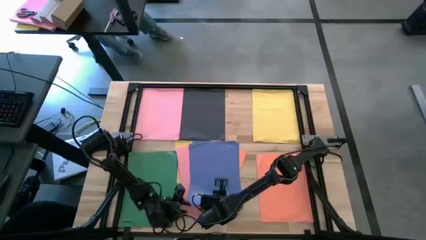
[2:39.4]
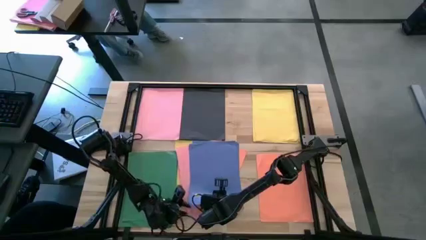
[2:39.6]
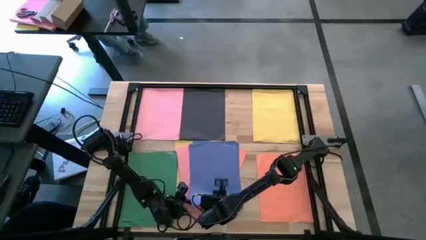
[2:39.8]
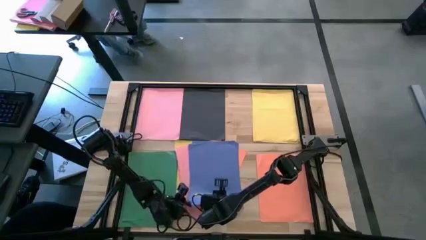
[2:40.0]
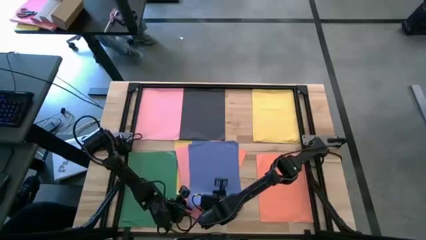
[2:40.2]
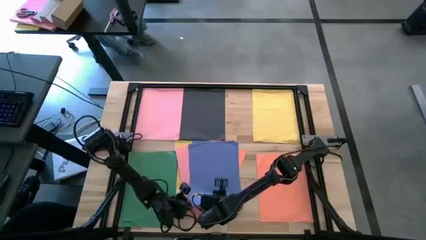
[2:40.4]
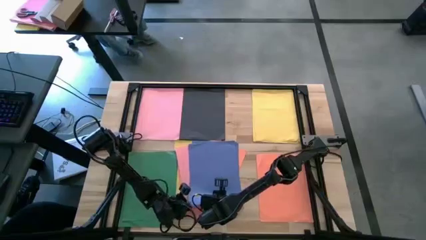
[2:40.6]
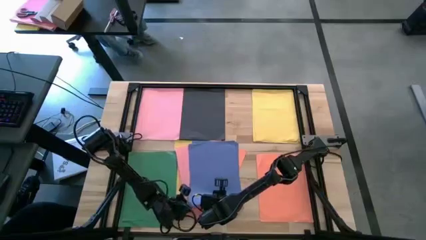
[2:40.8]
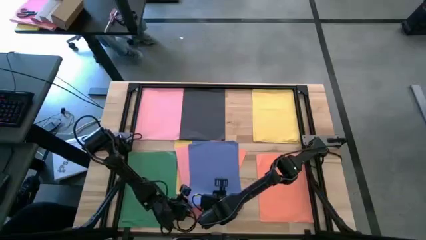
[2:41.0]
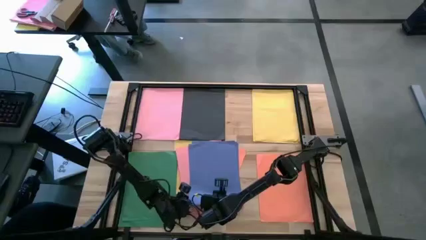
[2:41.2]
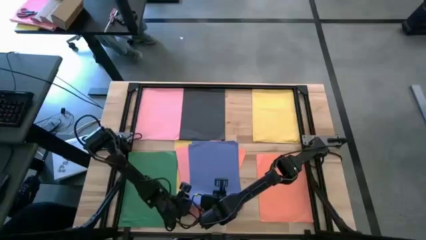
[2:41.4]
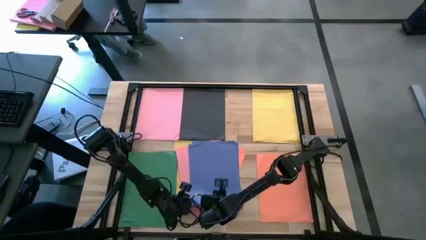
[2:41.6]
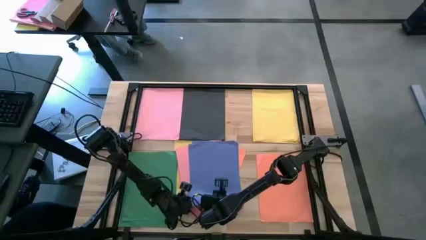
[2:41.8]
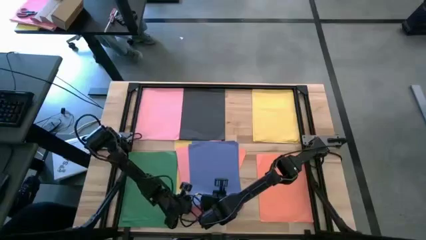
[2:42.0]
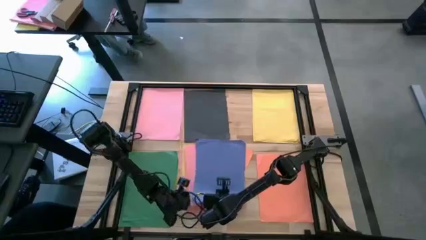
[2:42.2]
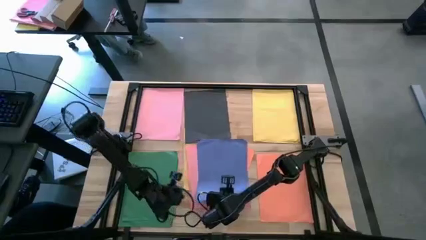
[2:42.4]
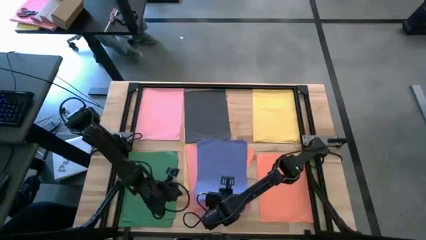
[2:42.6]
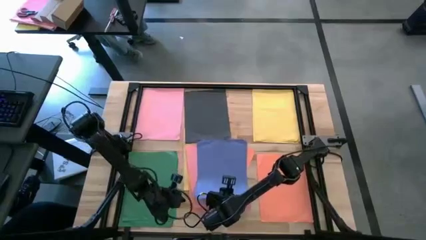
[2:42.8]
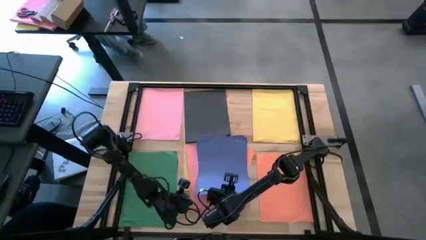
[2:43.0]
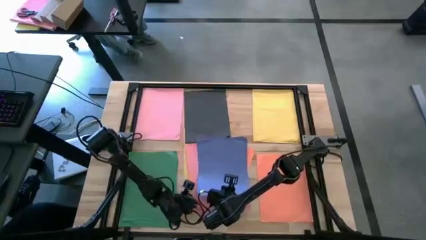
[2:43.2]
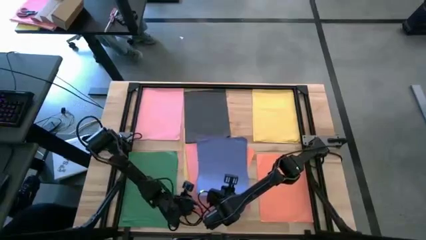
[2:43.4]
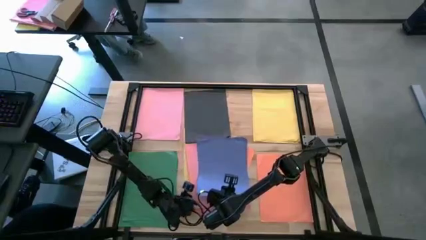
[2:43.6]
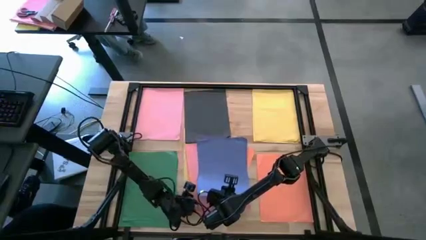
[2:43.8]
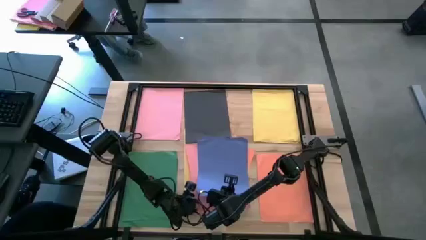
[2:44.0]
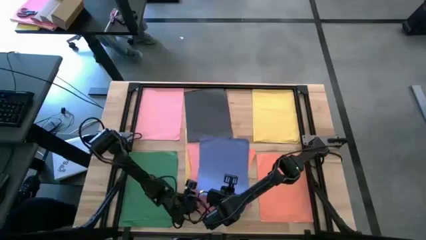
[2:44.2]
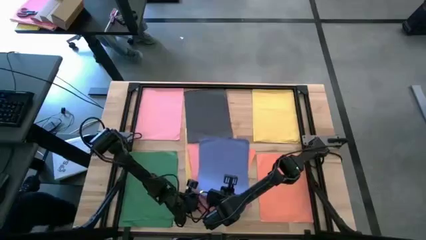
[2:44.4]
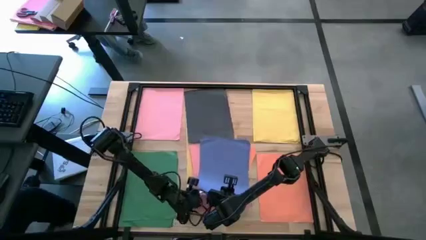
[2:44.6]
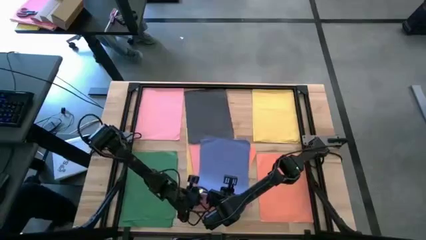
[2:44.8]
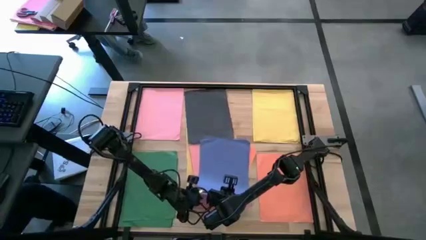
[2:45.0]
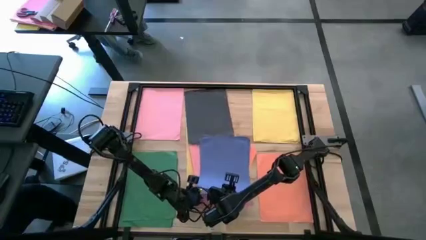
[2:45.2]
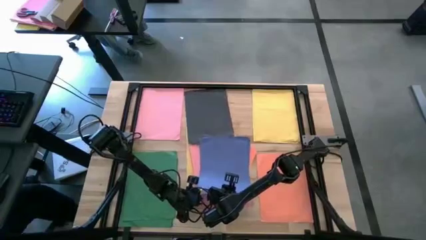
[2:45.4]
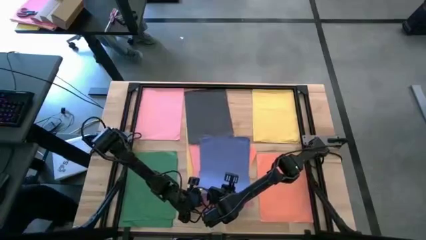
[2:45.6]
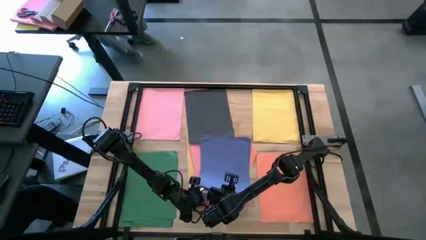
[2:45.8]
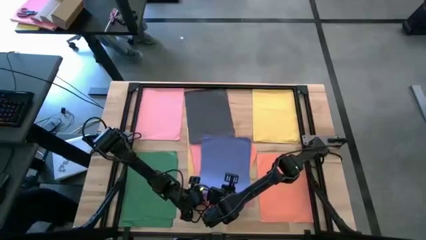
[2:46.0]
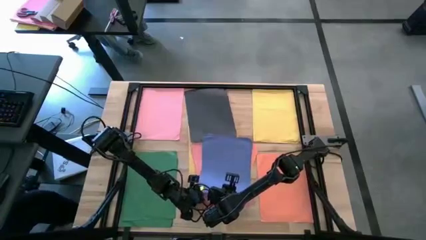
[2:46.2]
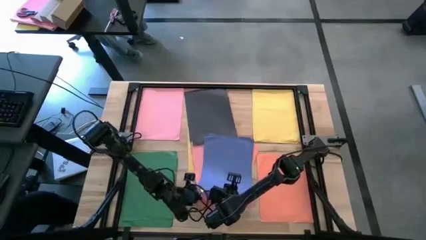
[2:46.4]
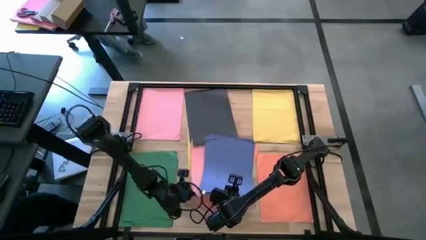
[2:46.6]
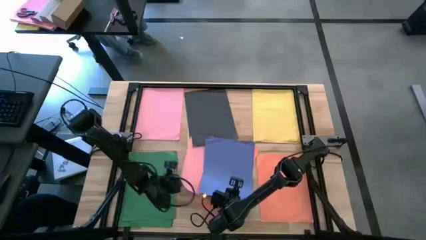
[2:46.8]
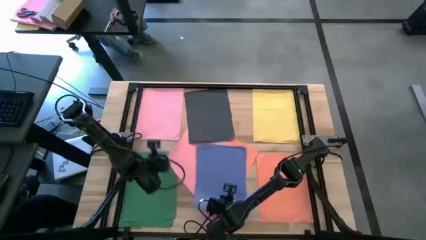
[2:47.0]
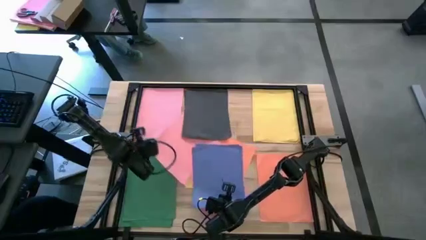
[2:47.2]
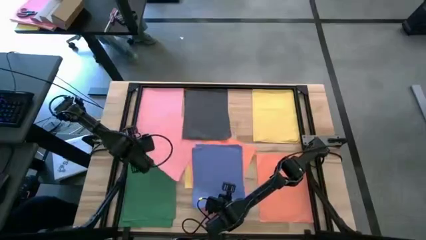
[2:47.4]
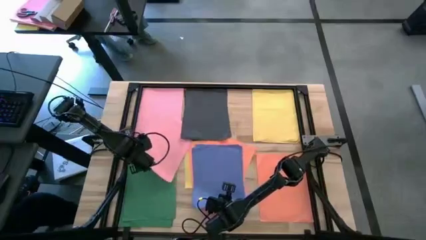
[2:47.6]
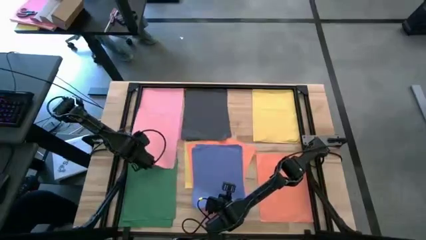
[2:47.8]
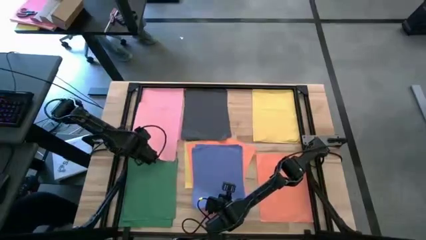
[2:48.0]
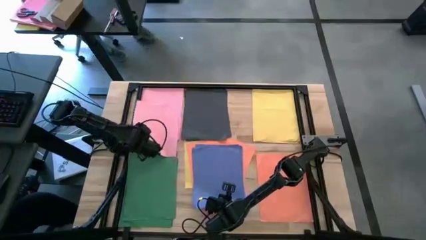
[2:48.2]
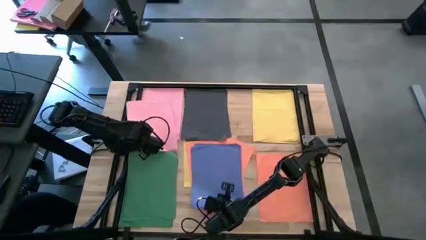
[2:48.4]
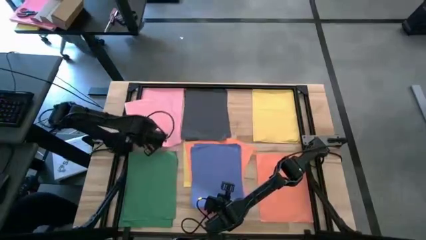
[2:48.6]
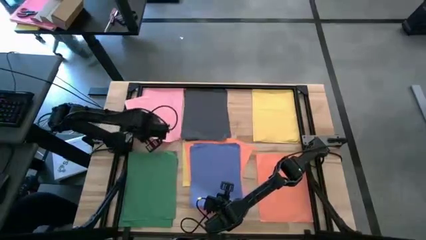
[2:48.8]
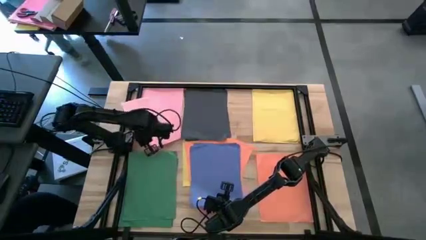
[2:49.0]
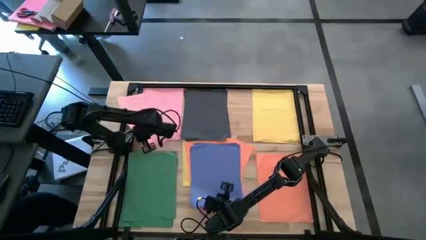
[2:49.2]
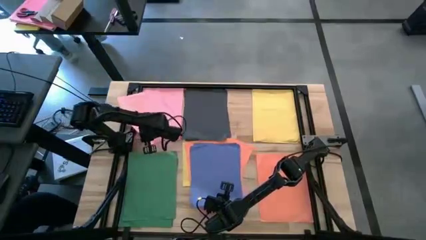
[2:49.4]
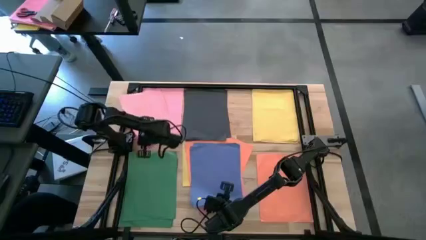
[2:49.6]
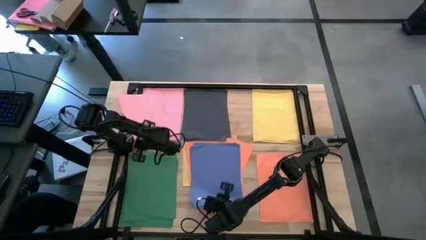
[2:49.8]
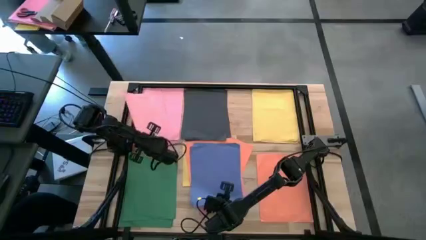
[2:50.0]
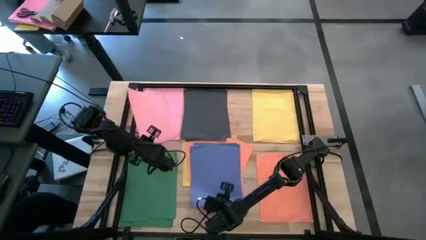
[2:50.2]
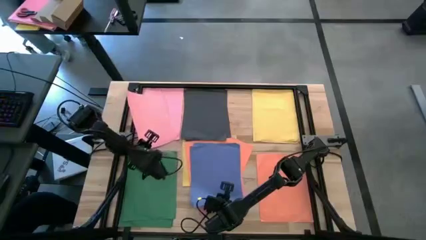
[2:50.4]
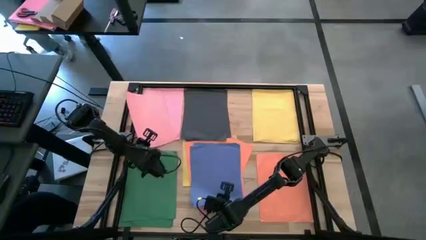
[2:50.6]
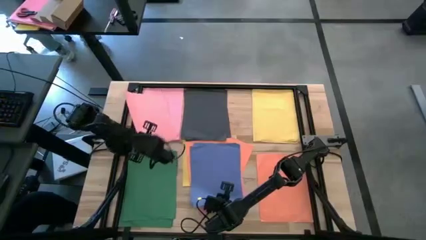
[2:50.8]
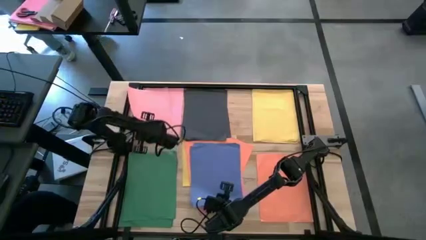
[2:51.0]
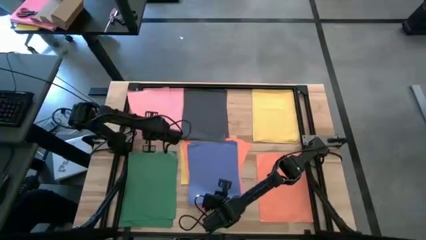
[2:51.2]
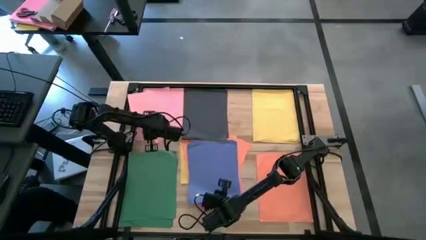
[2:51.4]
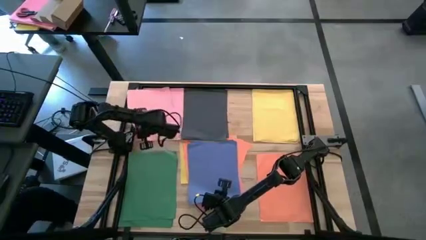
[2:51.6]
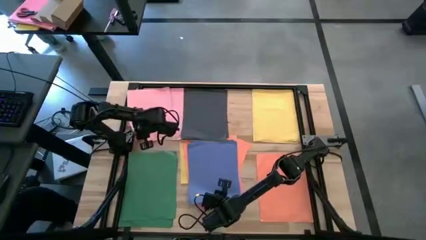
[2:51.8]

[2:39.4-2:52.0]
Task: Organize paper
Stack the pink color paper on top of the other pink color paper

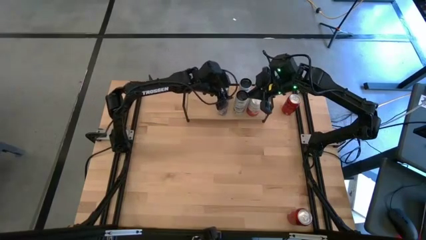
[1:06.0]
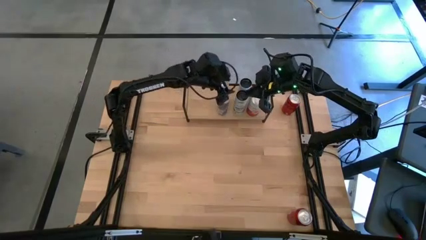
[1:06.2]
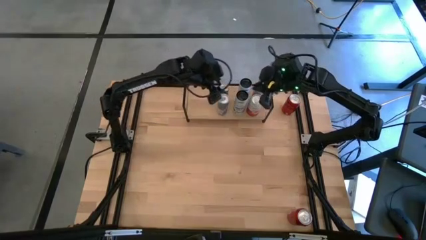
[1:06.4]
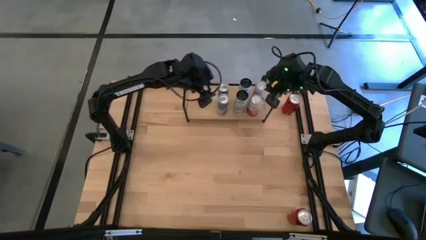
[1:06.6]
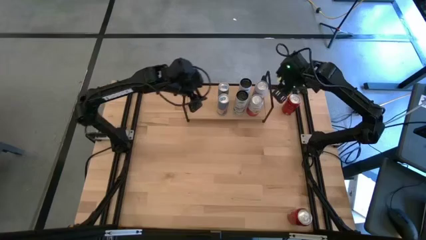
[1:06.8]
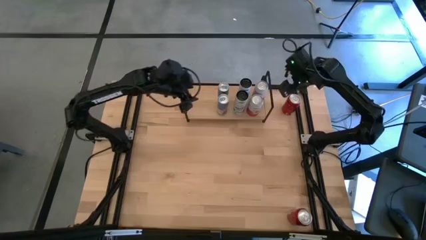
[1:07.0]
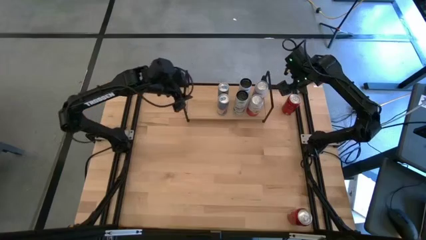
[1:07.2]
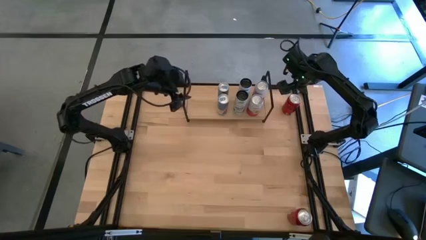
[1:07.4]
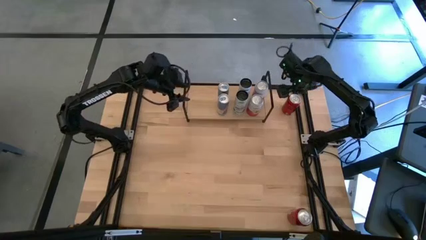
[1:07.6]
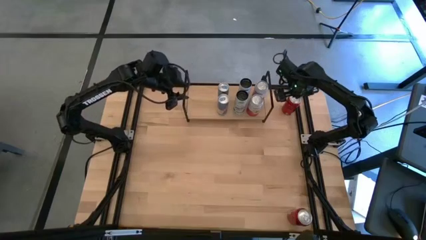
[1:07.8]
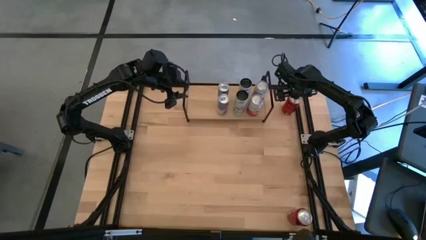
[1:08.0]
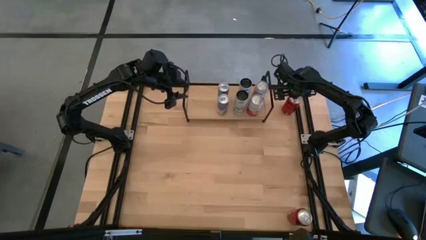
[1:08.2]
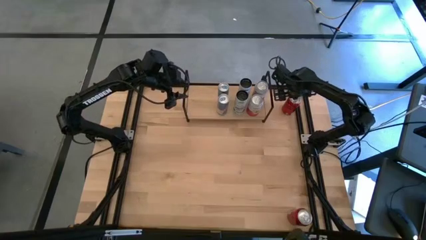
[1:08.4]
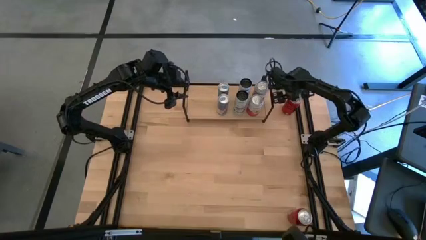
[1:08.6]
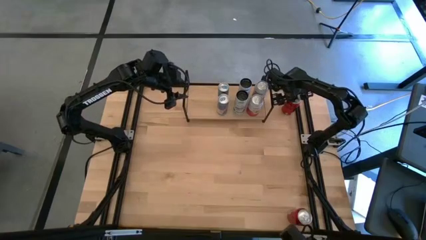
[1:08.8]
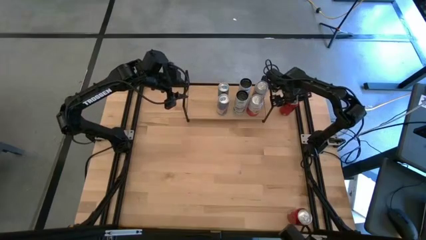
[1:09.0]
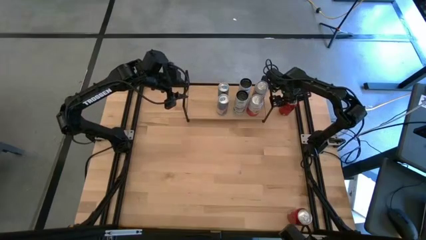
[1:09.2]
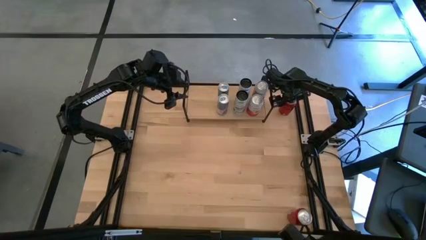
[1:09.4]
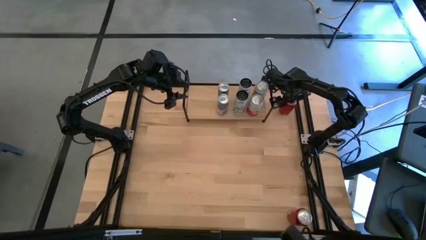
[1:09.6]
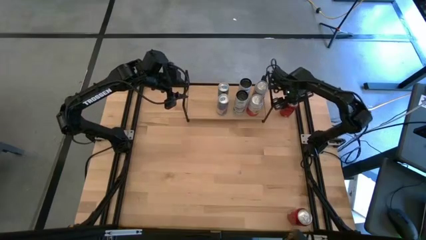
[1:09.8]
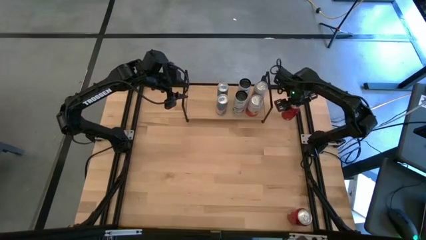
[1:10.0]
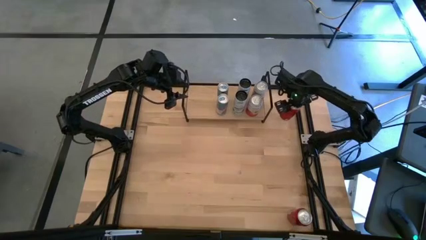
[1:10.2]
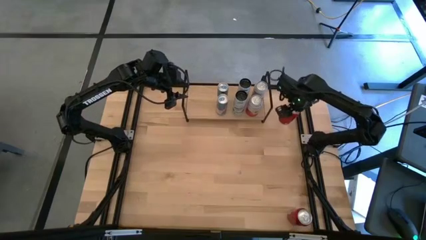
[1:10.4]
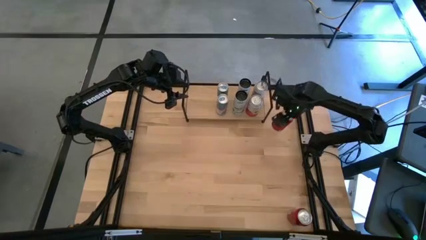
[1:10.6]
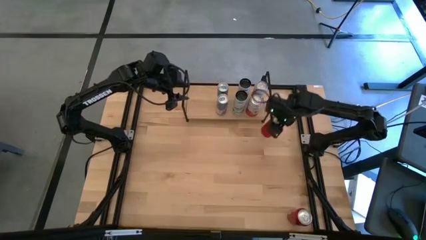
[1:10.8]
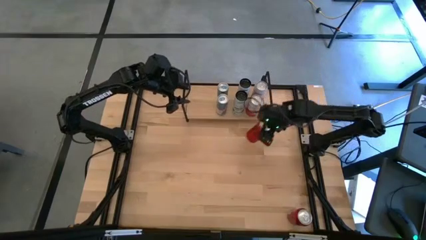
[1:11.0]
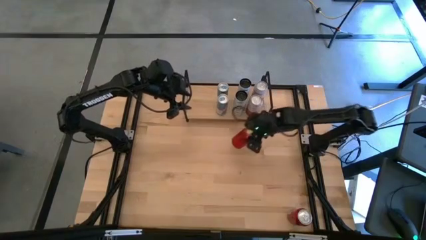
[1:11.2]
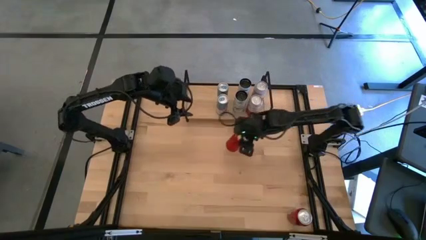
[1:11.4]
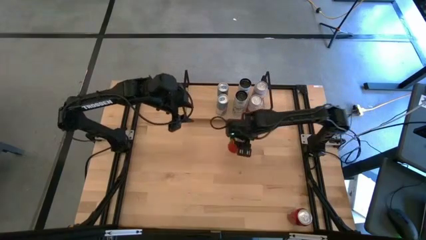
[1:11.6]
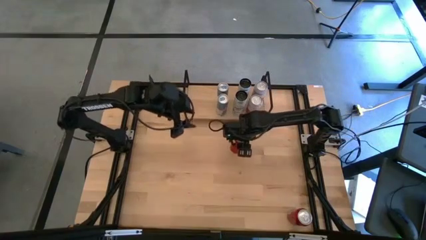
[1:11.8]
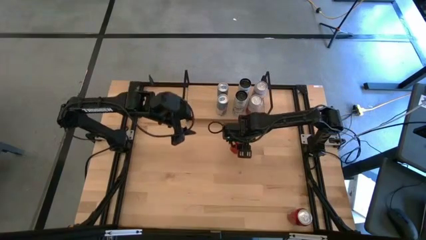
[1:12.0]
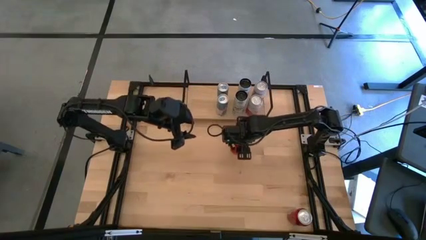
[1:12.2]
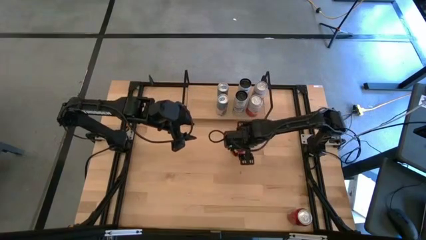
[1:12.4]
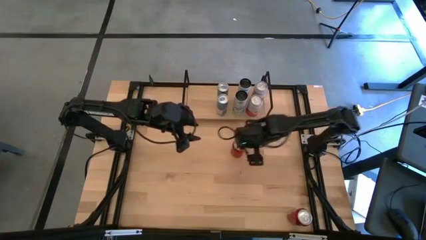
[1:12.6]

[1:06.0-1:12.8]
Task: Place canned beverage on shelf
Move the top red and black soda can to the center of the table
